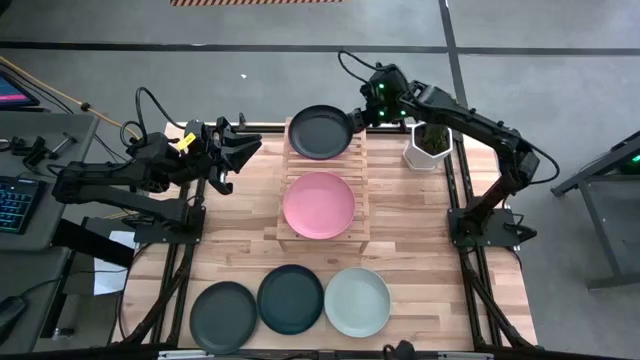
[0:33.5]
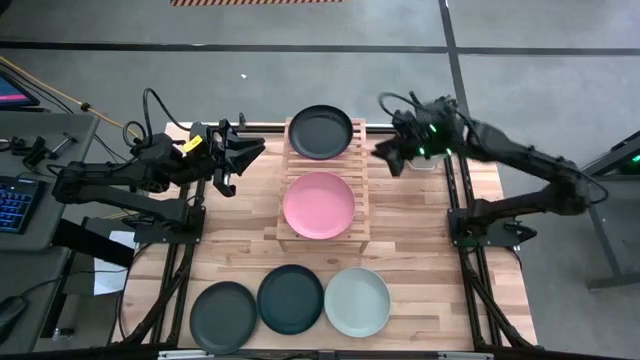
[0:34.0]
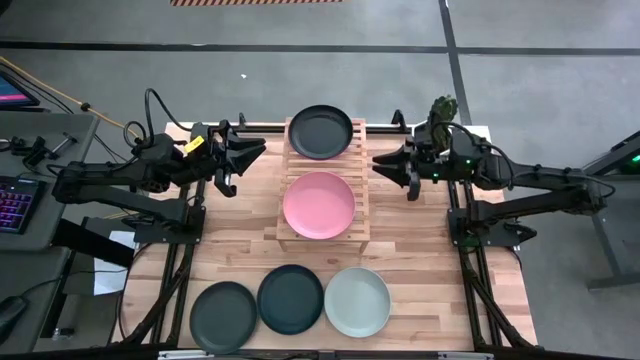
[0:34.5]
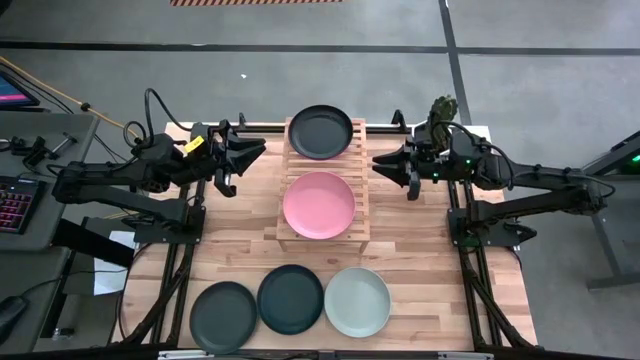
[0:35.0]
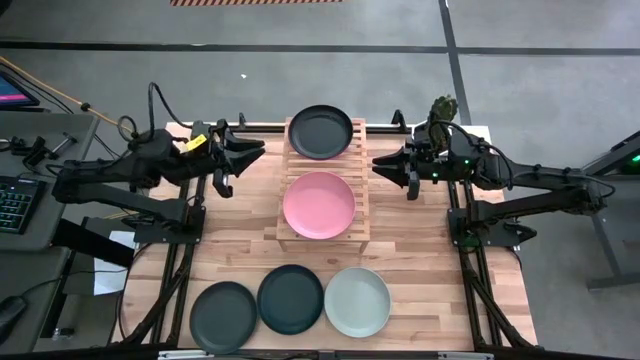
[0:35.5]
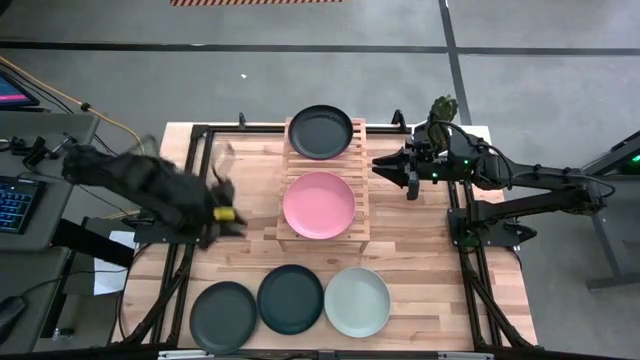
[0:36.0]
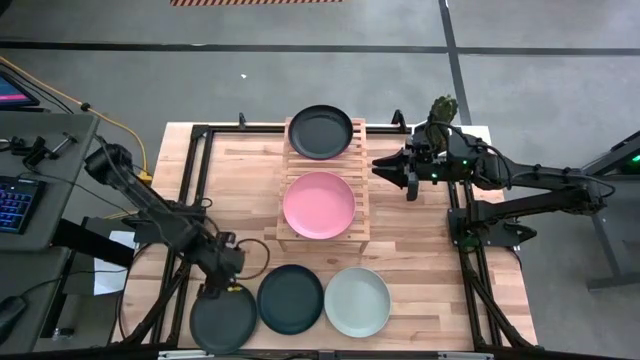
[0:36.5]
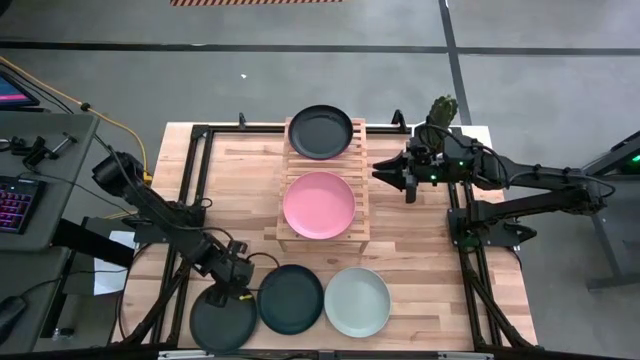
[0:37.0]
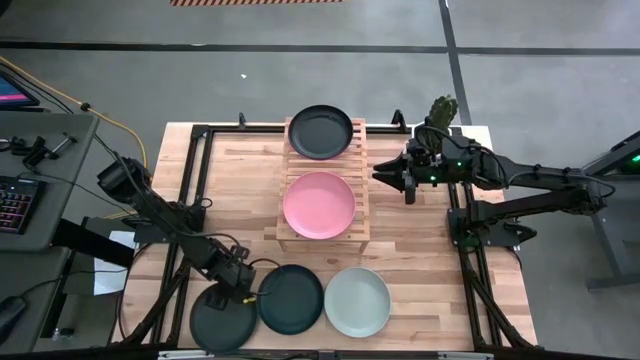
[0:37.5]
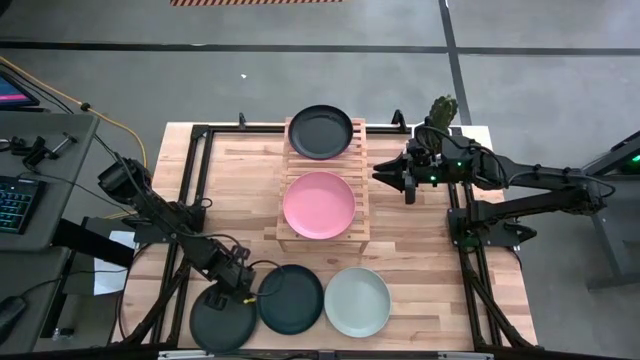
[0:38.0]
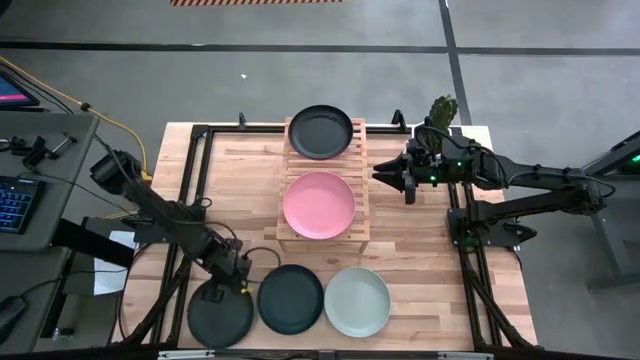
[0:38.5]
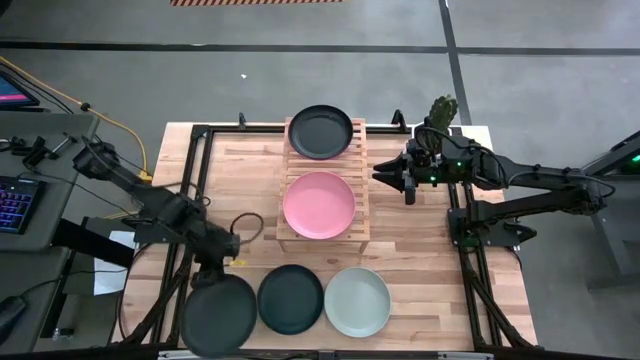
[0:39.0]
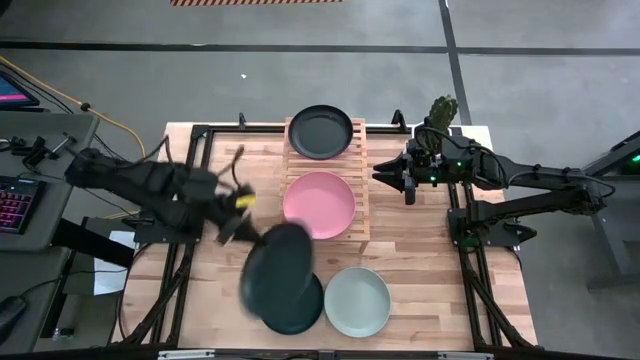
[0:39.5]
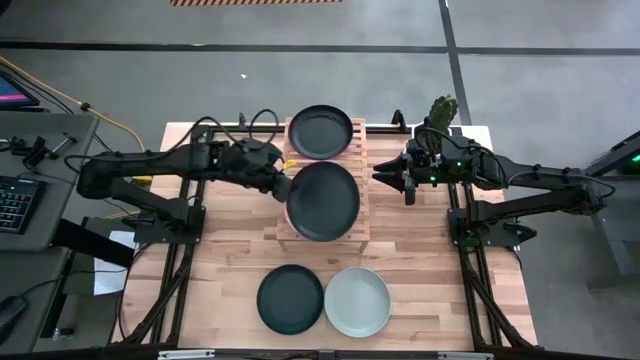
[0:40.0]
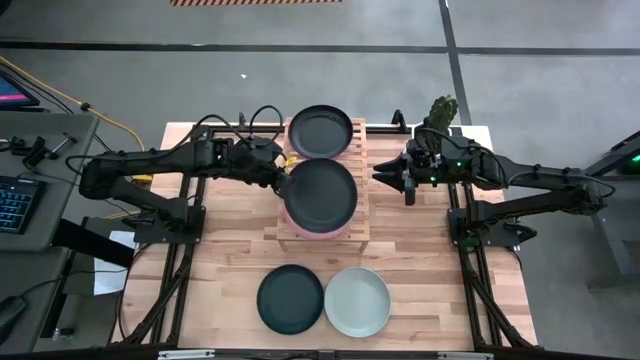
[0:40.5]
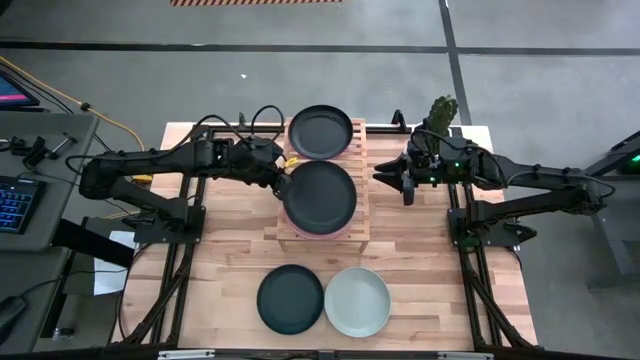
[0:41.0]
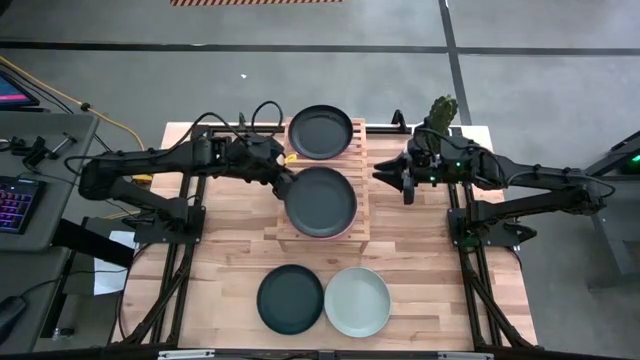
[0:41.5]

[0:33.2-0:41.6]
Task: Place and stack plates onto a shelf
Stack the left black plate on top of the light pink plate on the shelf

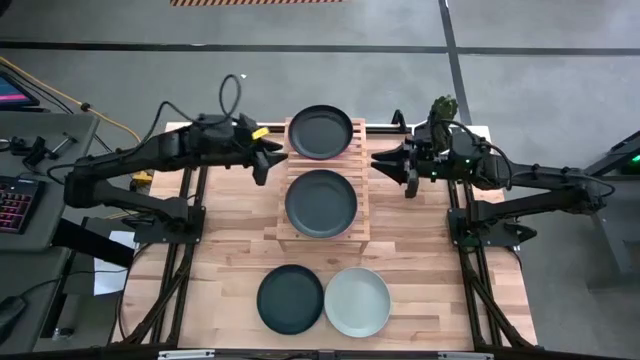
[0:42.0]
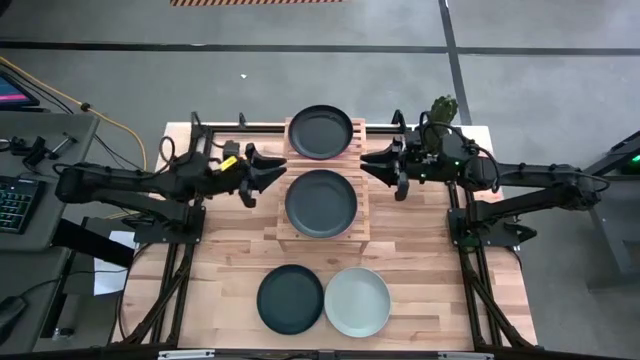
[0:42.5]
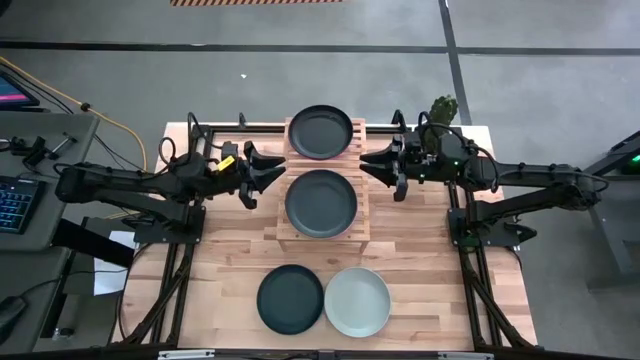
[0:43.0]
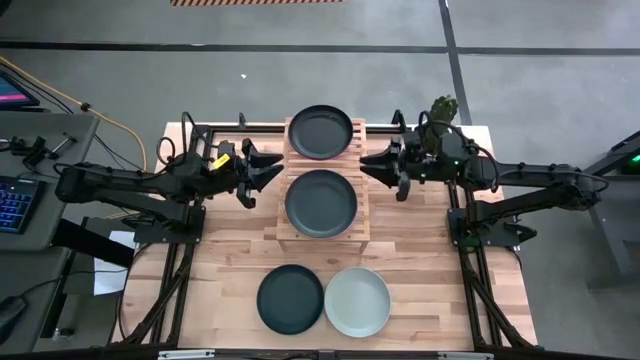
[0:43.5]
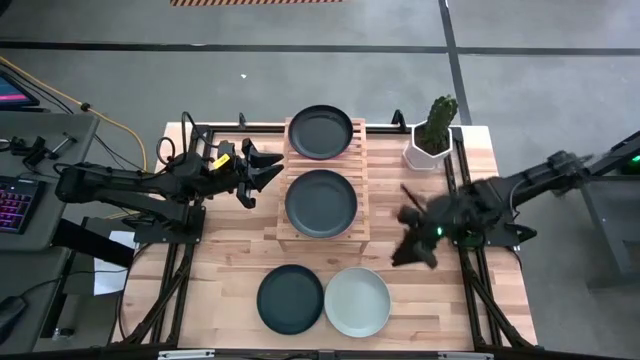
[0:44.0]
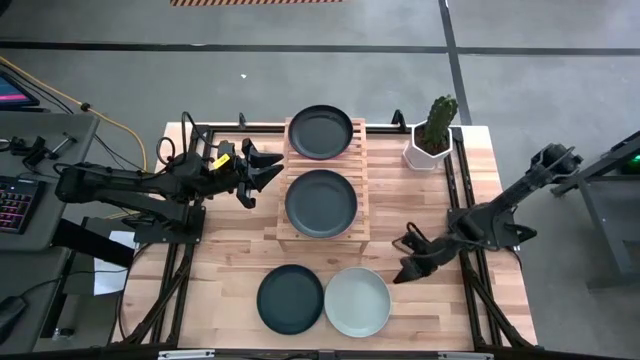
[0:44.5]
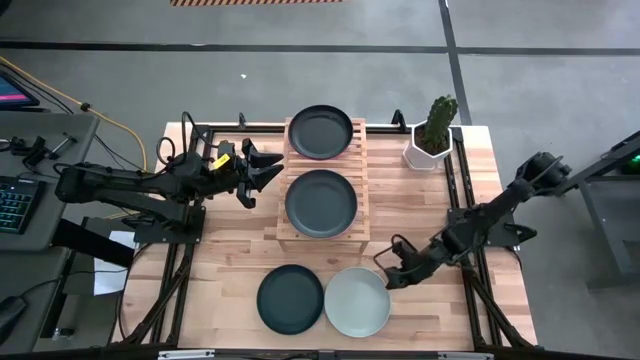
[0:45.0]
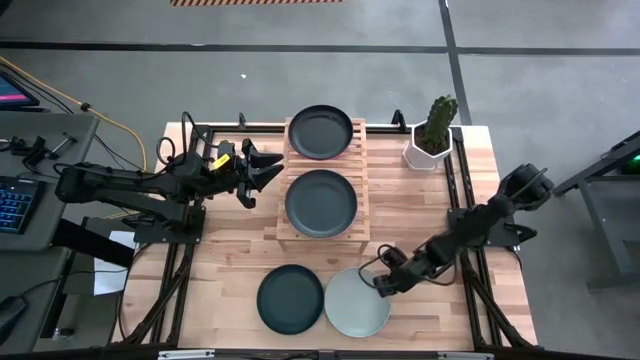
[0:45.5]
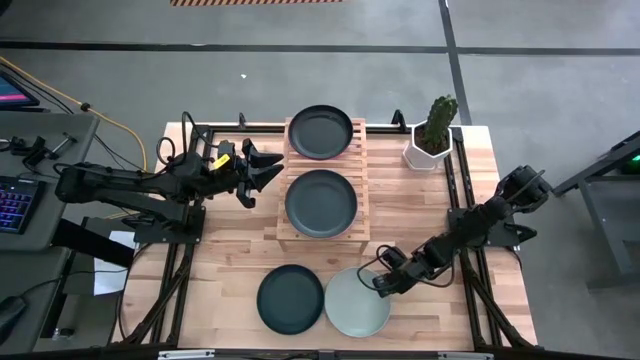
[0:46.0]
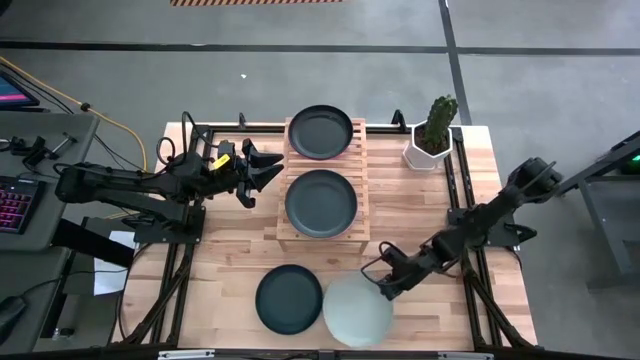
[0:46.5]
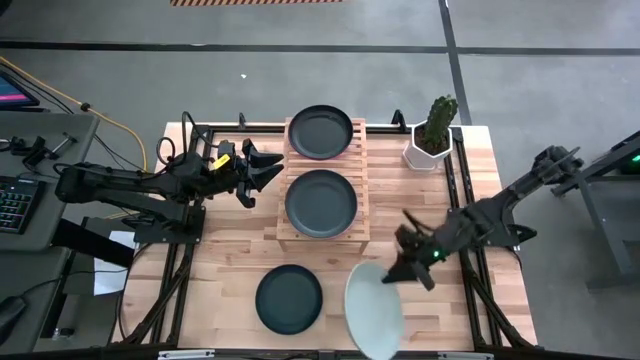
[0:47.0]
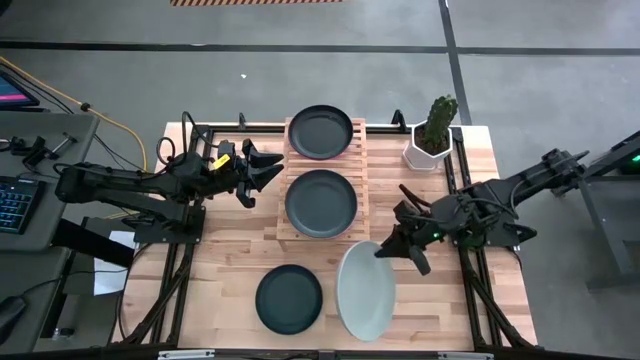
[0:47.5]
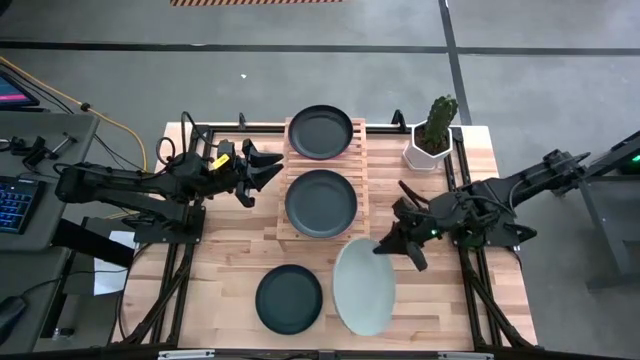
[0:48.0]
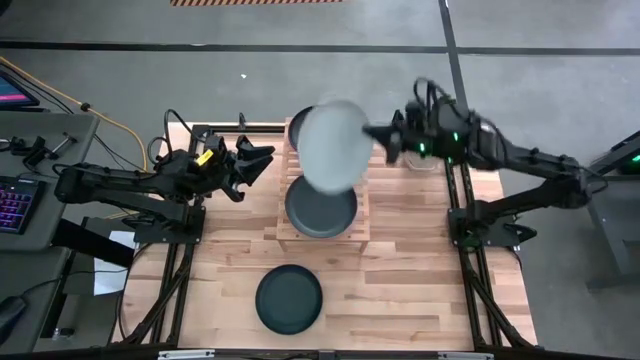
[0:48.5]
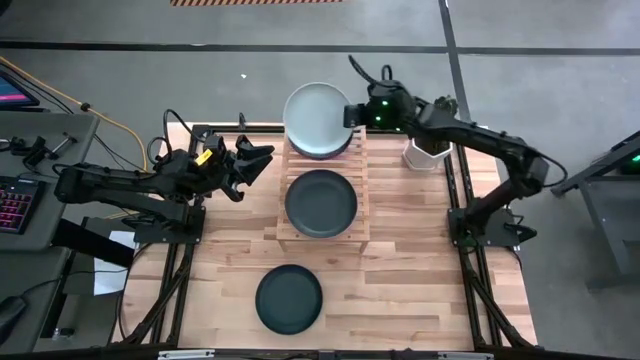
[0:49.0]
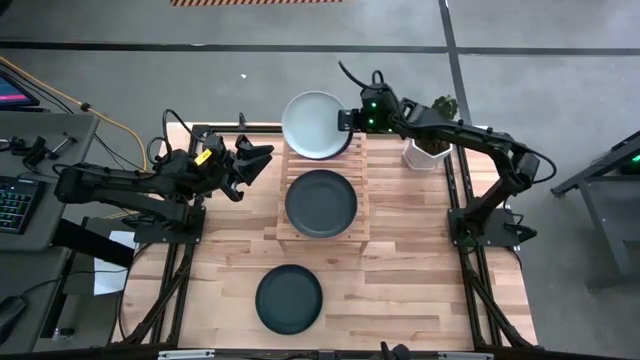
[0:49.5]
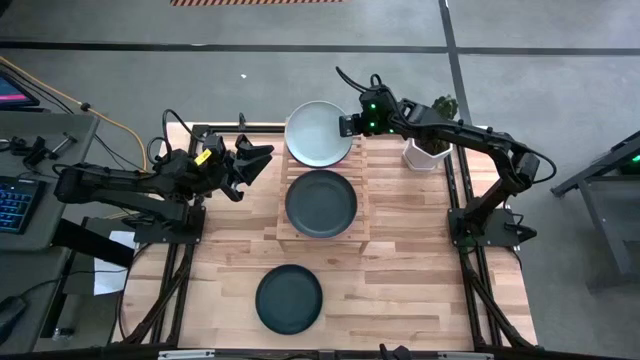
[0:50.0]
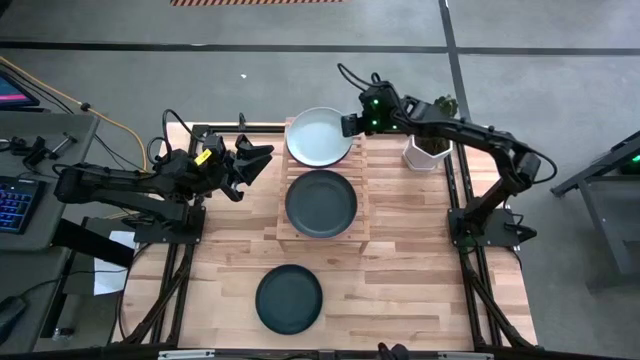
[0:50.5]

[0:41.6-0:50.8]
Stack the white plate on top of the top black plate on the shelf

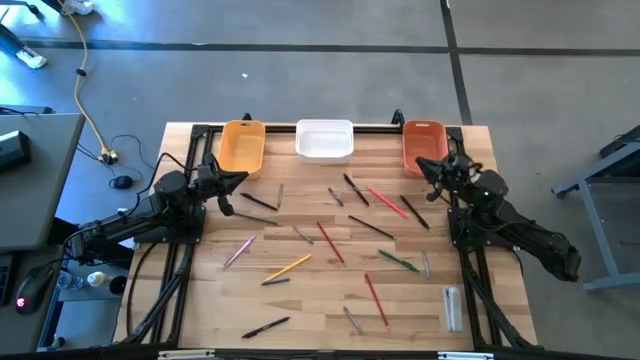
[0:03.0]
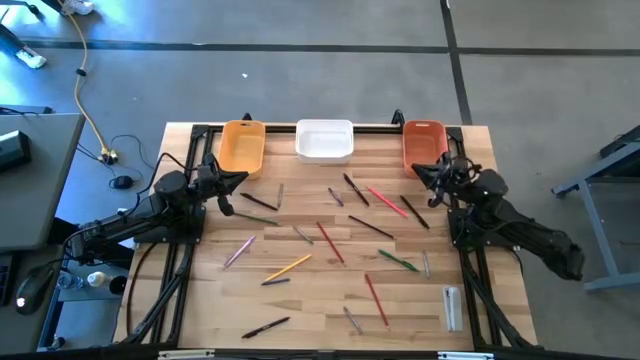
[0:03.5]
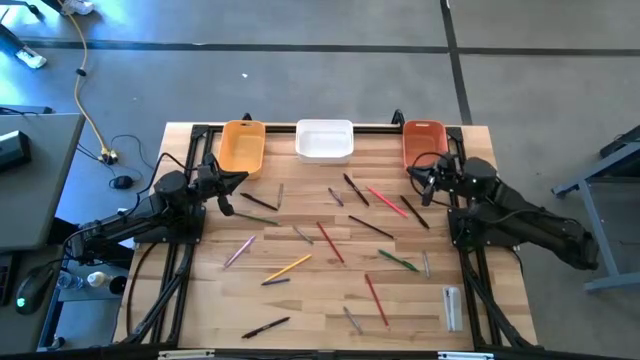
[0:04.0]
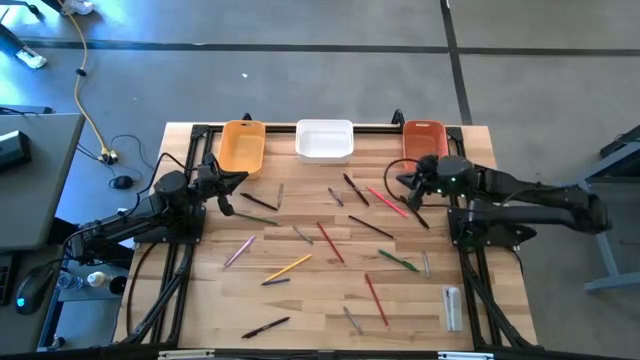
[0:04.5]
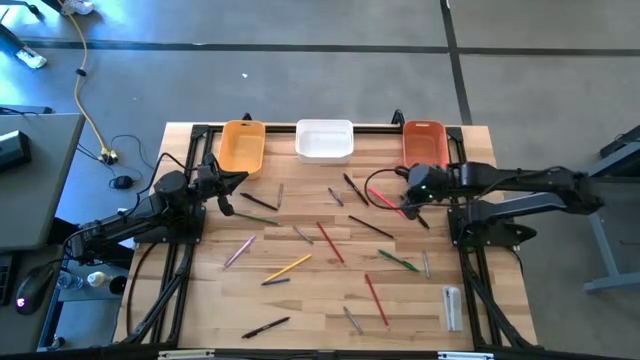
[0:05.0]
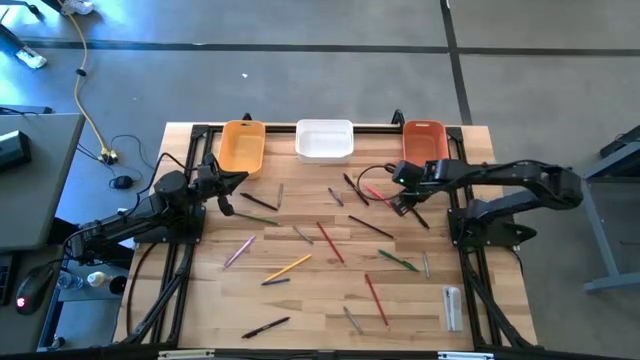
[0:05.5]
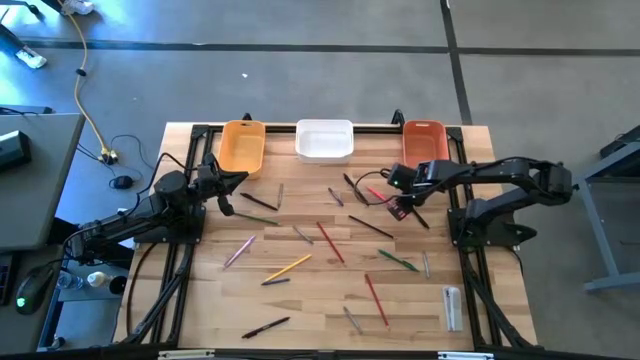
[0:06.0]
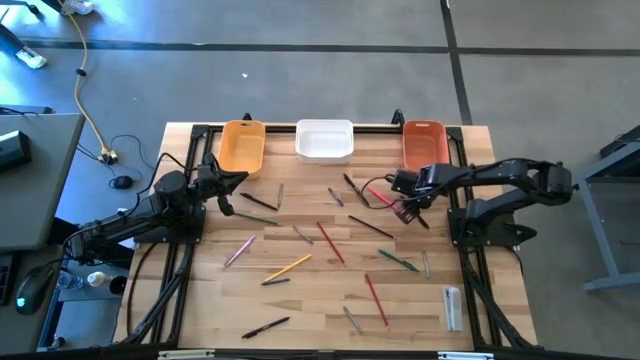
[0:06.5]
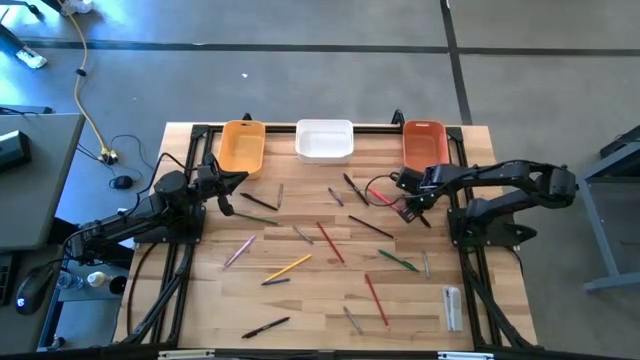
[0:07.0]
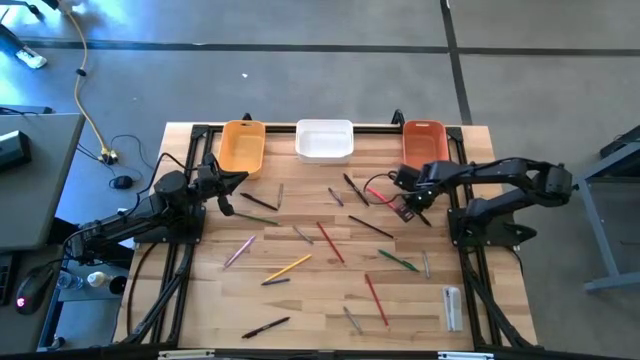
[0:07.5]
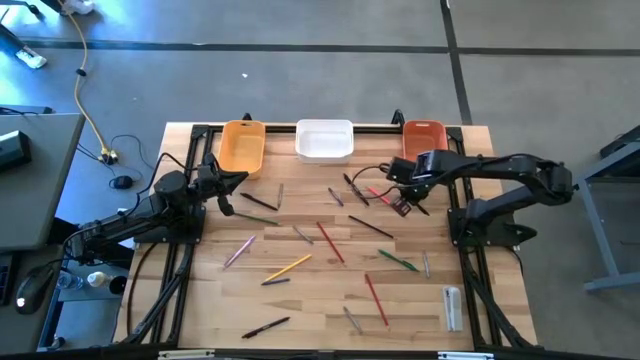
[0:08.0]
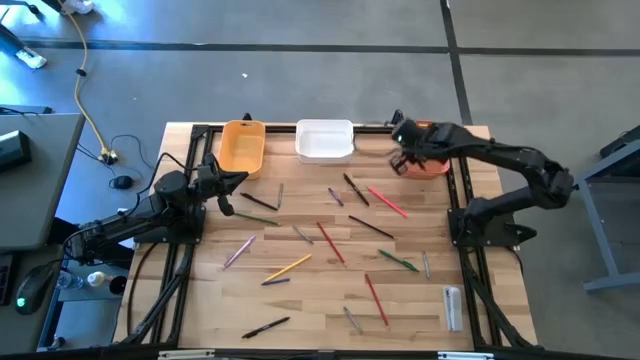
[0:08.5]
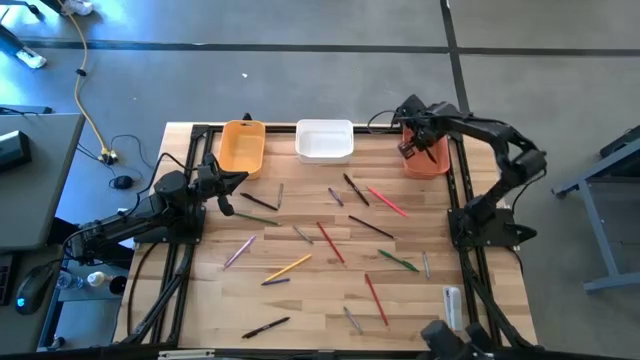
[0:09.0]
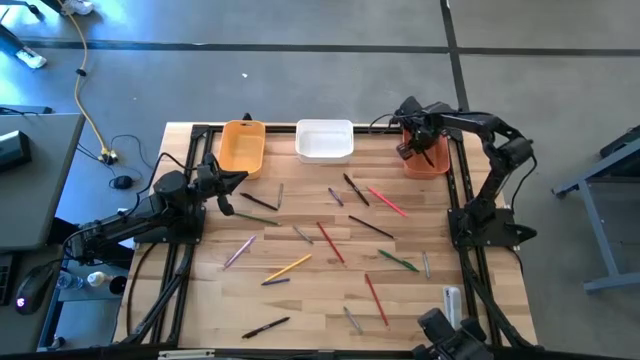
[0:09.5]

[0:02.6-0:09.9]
Task: Sort crayons/erasers/pens/pencils in bins
Put the black pen into the orange bin
